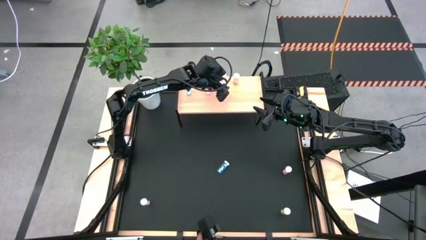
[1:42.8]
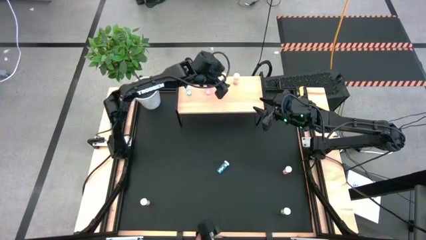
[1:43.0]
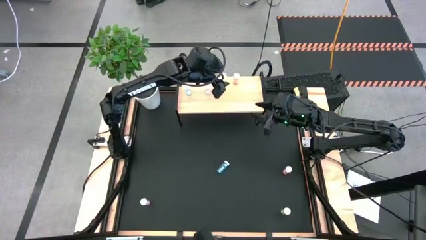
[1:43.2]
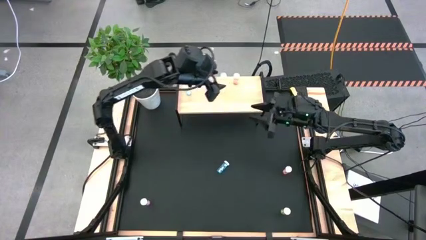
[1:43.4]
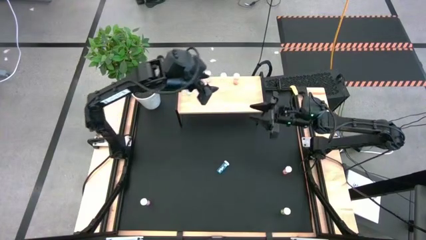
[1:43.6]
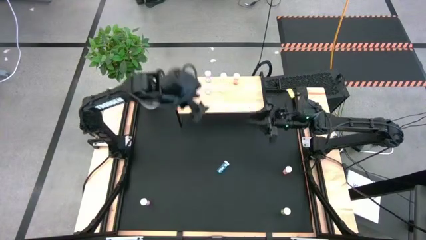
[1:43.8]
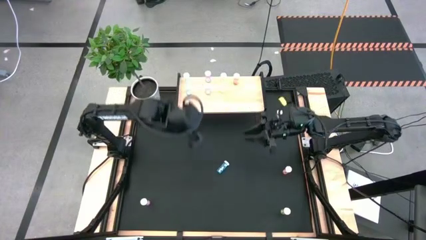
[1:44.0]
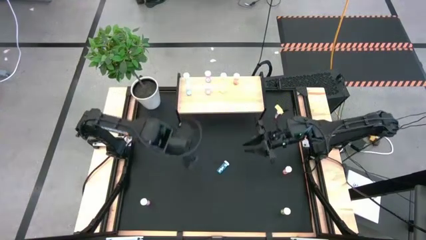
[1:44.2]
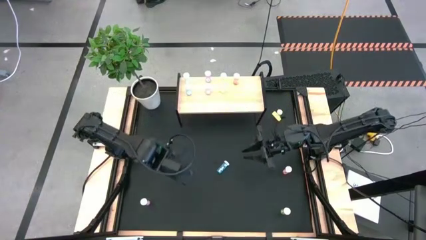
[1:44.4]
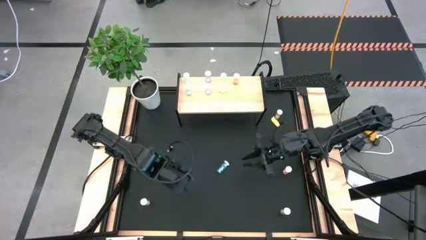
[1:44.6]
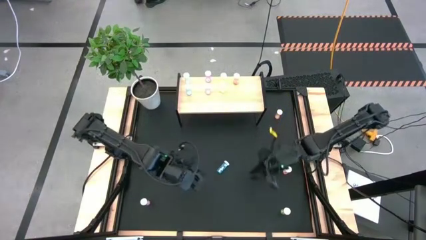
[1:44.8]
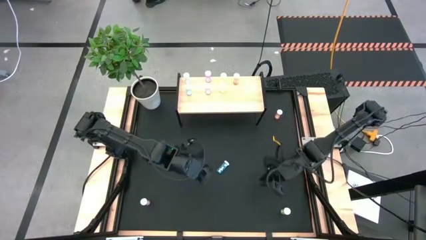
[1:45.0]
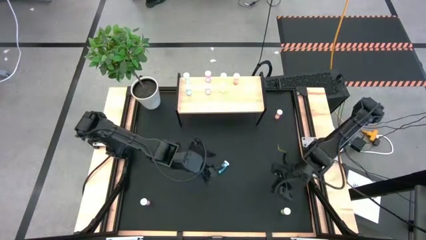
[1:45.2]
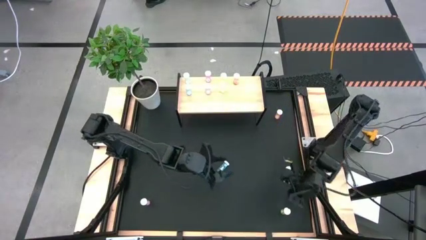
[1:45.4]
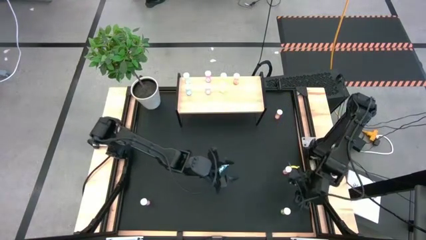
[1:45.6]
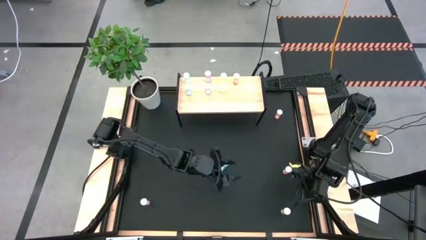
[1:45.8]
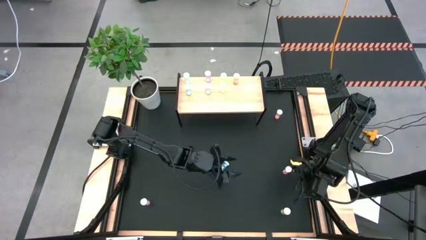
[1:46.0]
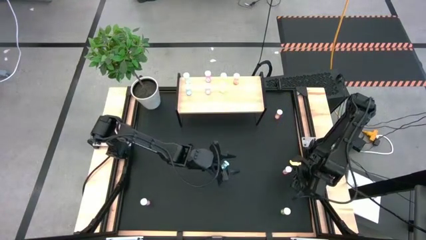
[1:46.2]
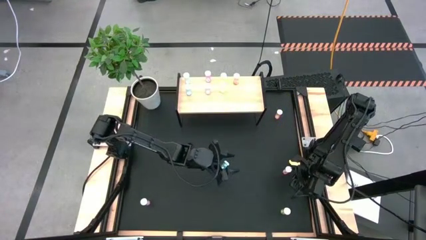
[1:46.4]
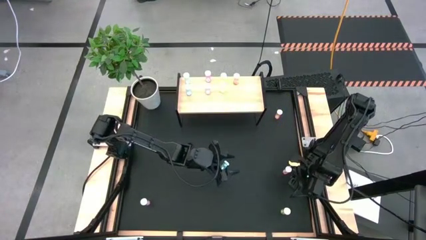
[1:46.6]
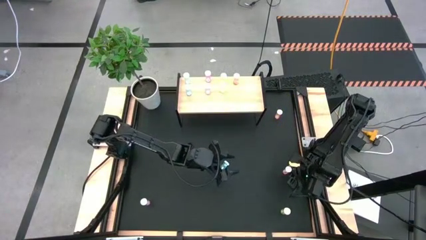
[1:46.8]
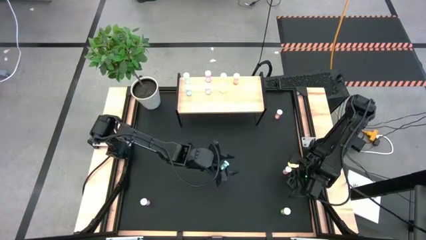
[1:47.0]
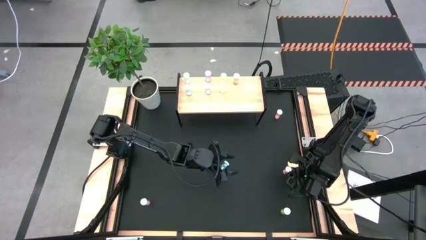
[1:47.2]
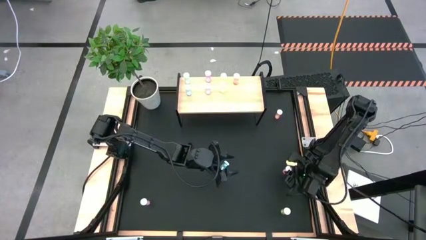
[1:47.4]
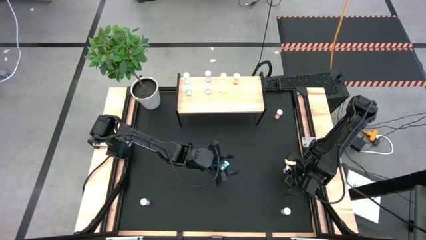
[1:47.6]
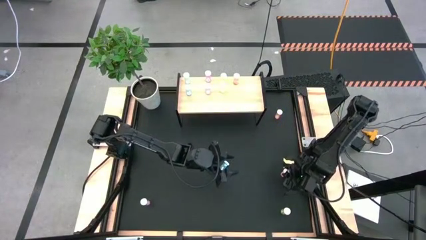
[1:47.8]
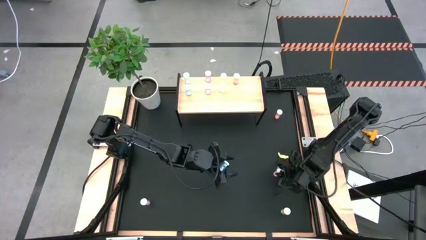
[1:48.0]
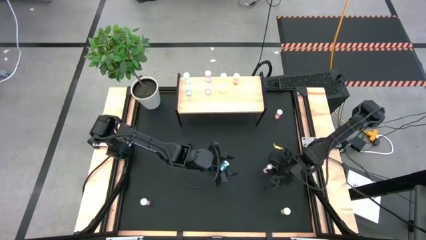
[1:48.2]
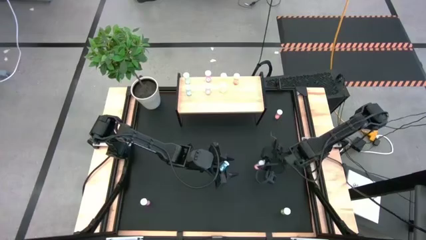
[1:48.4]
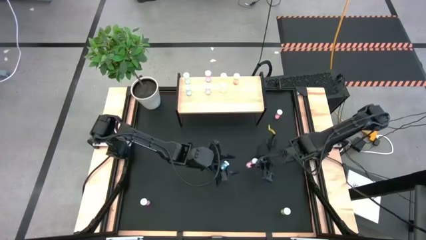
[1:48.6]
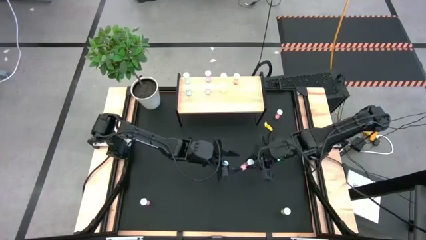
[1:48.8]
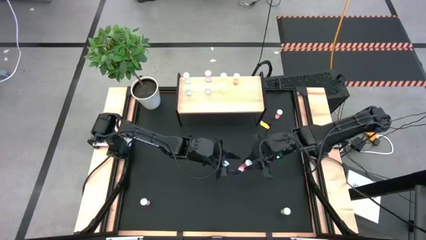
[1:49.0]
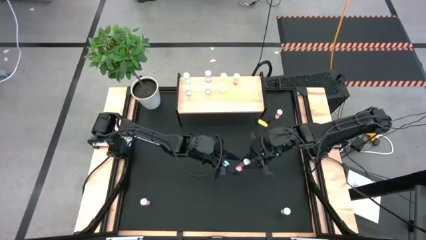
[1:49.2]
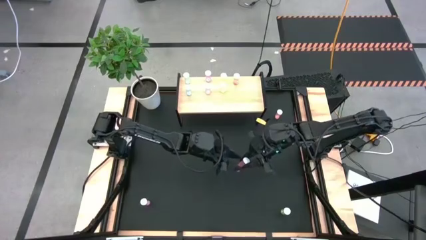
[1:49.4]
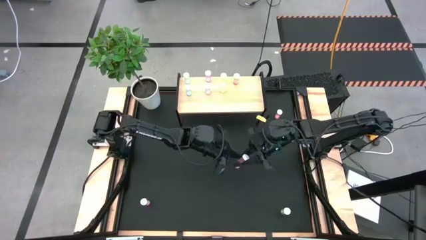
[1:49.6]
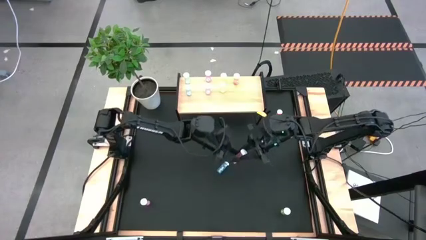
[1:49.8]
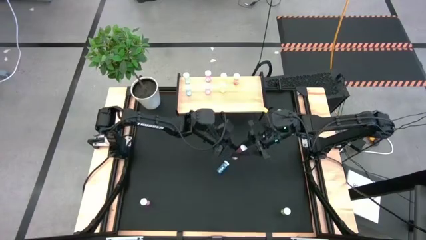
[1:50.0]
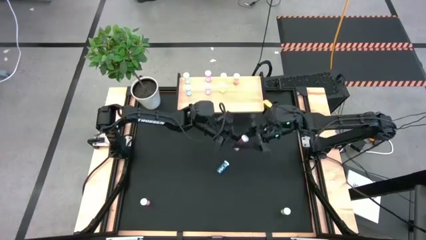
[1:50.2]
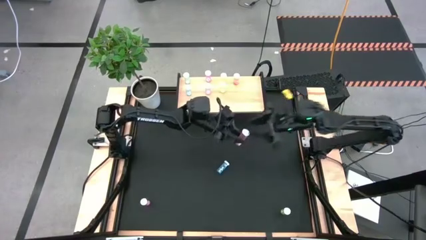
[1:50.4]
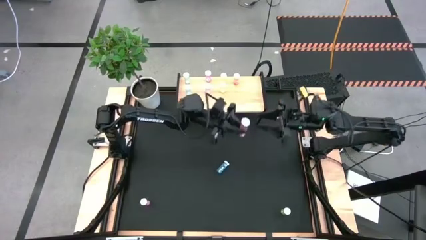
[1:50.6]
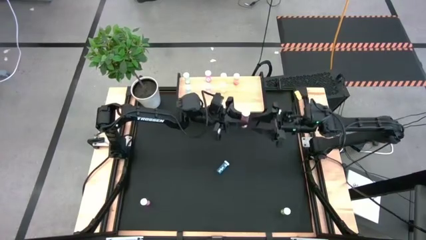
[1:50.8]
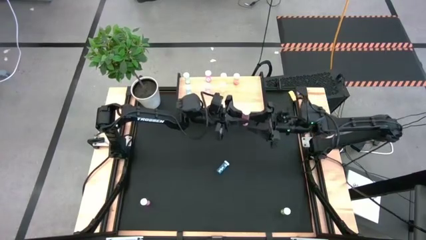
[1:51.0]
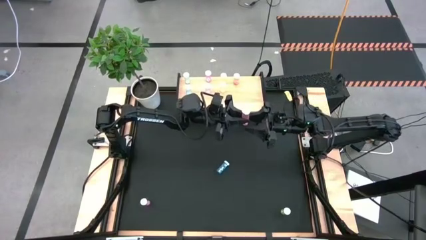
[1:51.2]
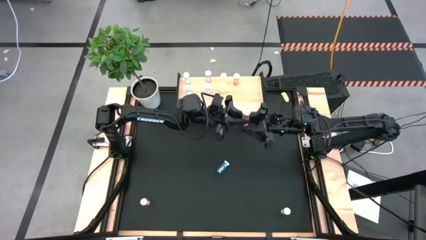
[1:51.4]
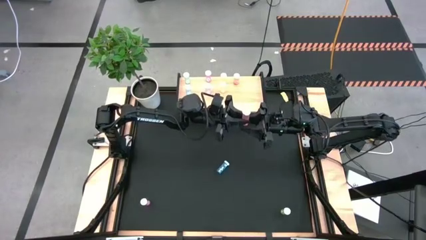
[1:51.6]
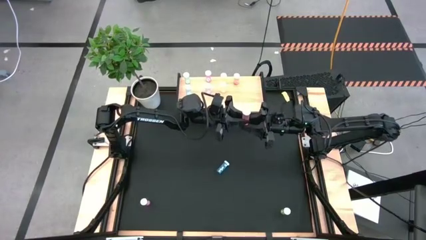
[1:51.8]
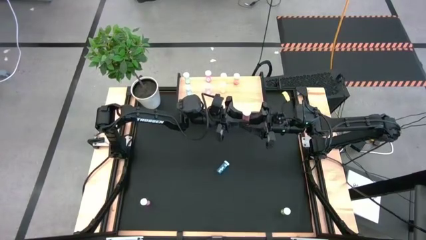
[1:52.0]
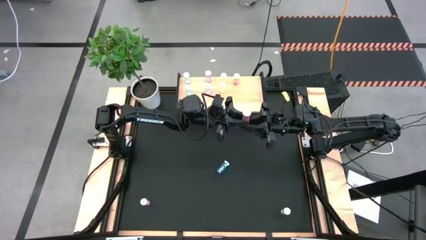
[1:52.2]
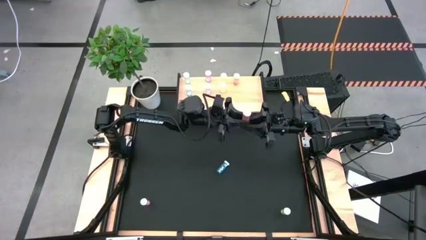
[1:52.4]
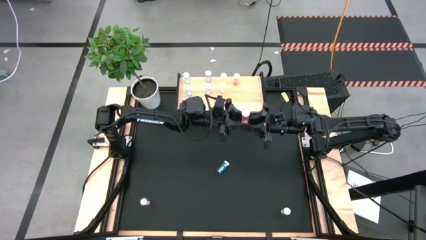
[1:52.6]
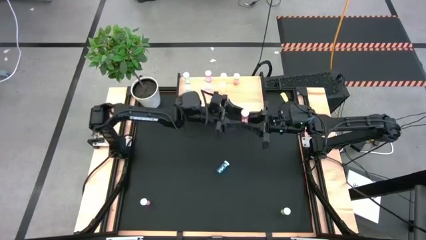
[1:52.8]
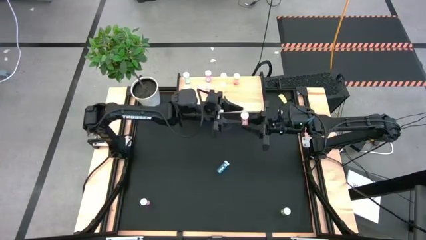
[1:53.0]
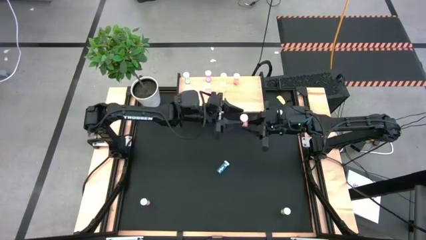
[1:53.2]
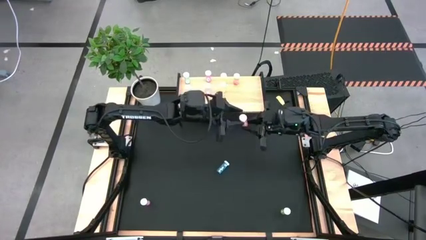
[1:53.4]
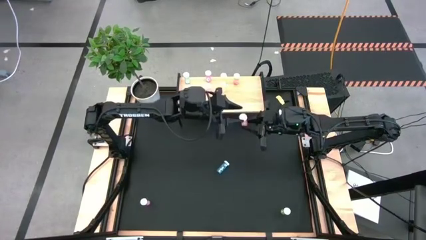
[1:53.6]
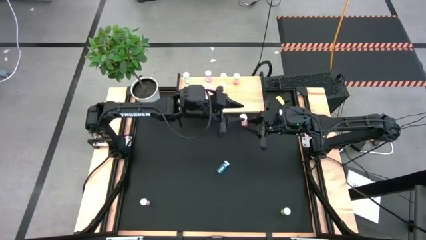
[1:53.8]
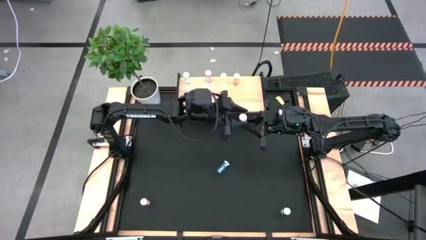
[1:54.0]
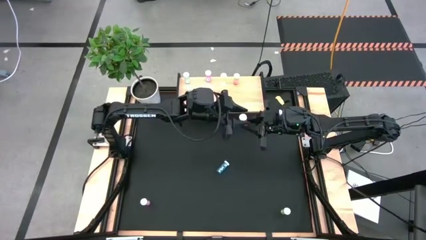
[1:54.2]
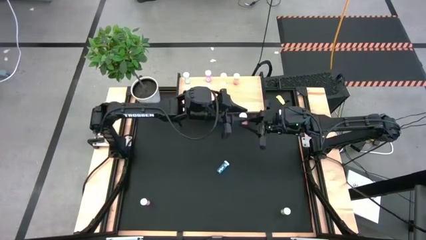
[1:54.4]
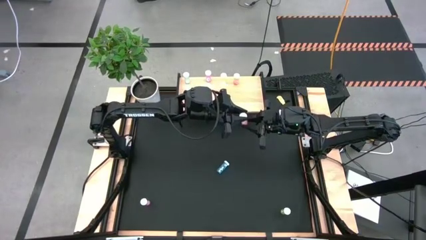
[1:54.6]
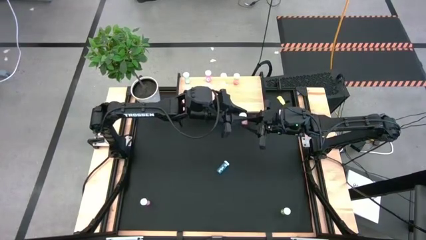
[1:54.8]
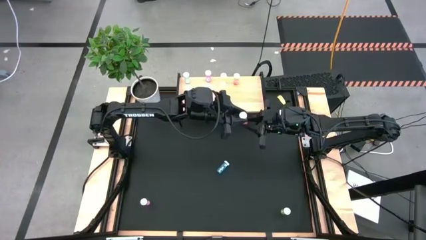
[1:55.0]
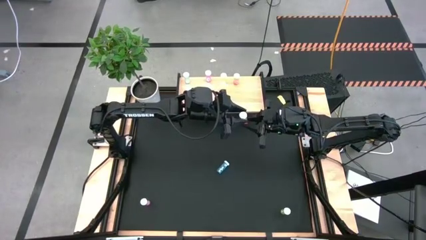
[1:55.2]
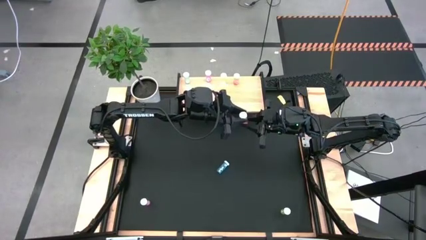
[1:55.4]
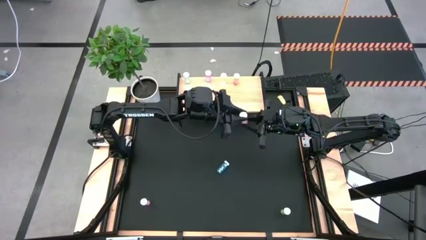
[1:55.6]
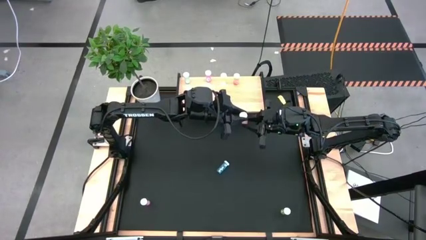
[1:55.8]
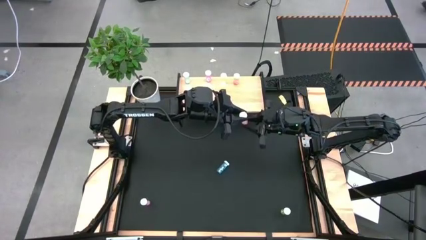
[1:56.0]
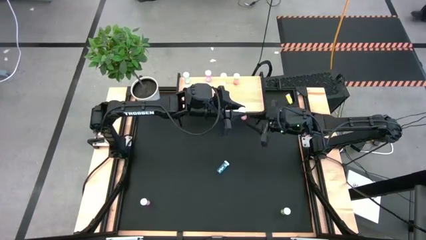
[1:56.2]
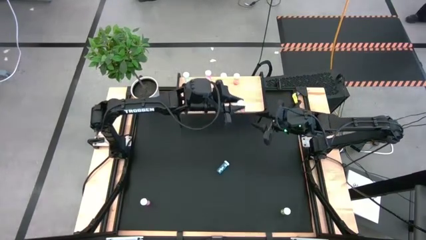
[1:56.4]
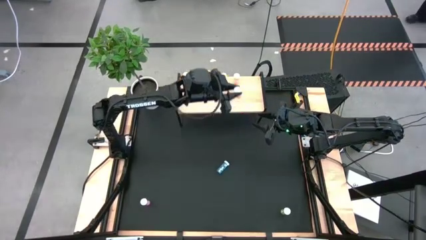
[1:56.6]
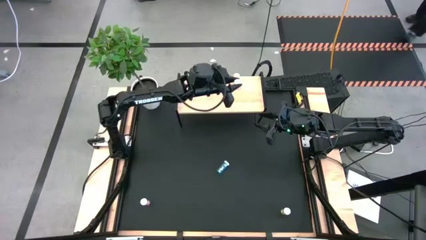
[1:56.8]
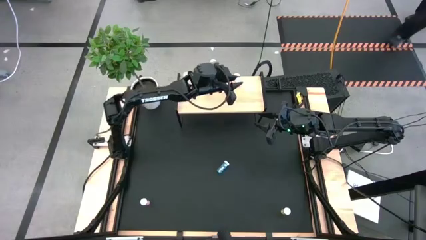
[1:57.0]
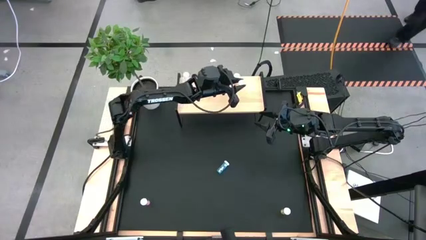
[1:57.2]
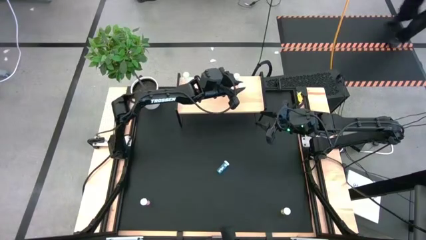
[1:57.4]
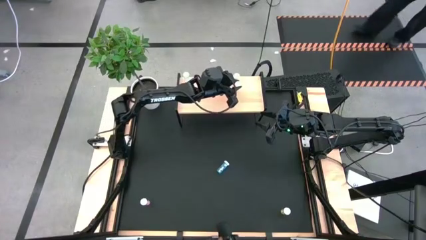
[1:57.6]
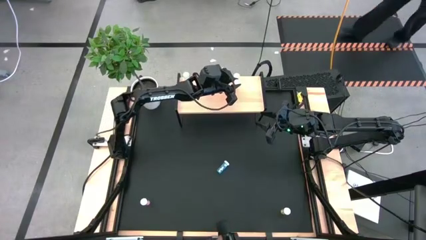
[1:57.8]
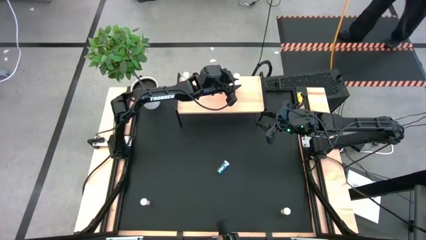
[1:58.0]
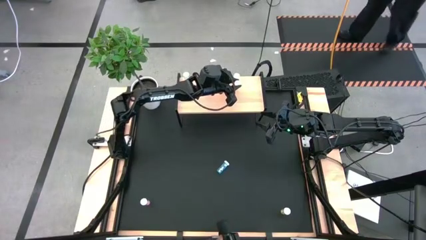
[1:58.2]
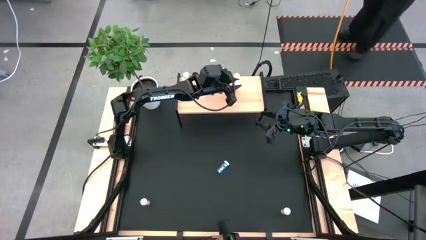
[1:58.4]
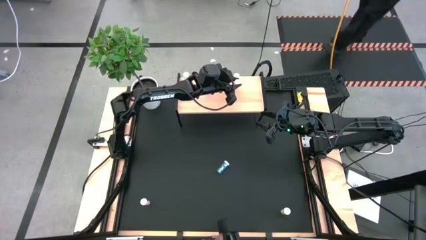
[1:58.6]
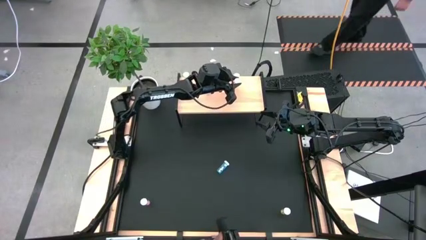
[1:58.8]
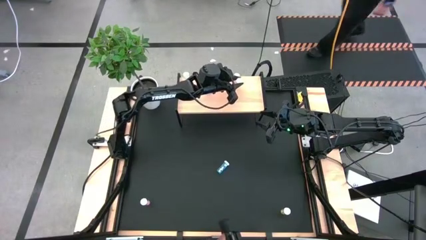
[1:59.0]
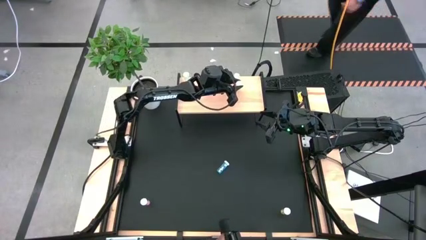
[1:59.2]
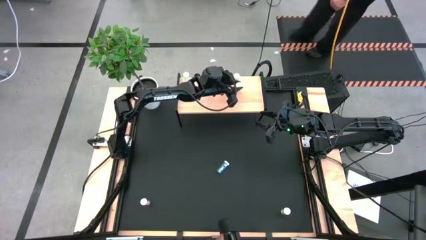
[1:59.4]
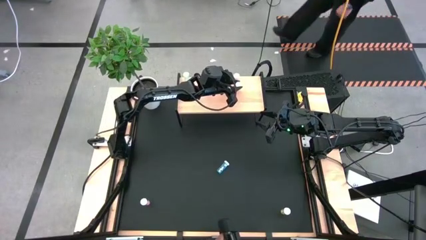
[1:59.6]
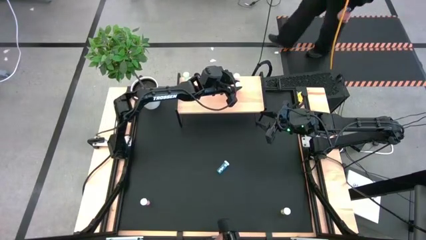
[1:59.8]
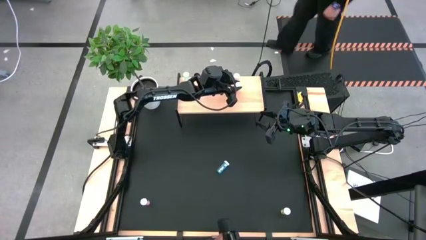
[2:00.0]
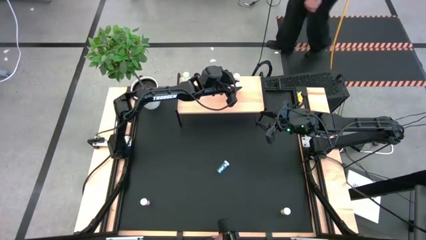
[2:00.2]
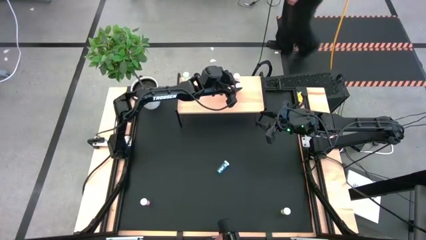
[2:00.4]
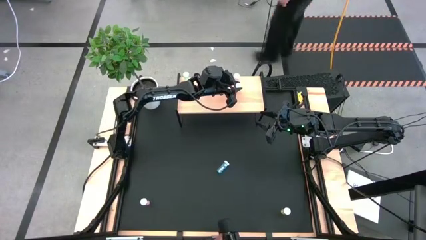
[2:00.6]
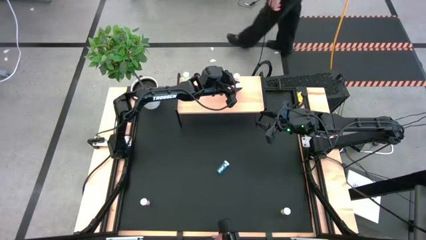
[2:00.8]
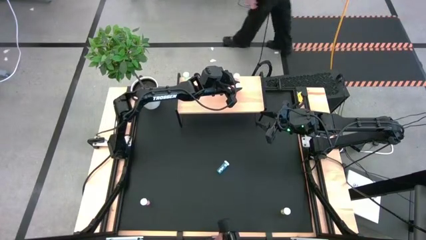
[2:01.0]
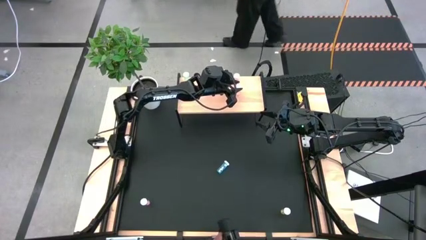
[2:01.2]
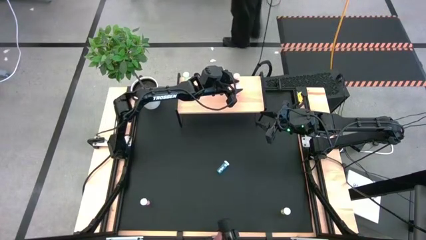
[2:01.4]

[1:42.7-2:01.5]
Task: Pick and place medicine bottles onto shelf by color
Put the bottom orange pill bottle on the shelf aligned with the other orange pill bottle
